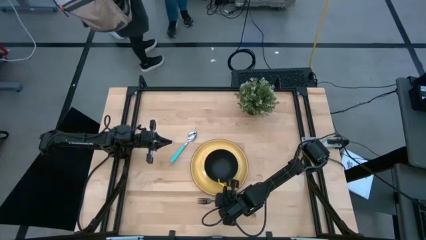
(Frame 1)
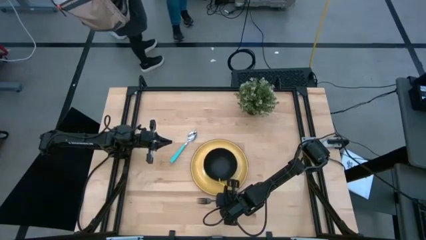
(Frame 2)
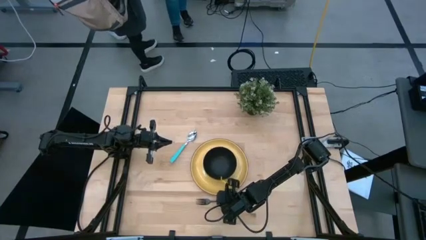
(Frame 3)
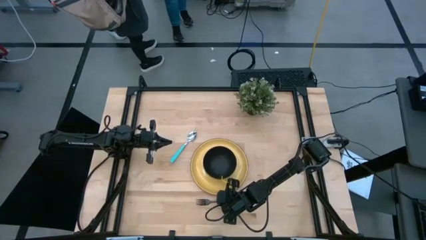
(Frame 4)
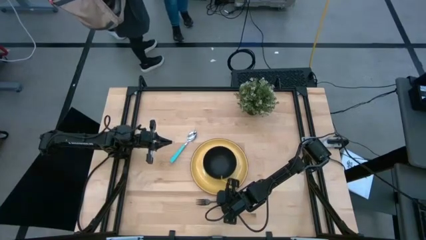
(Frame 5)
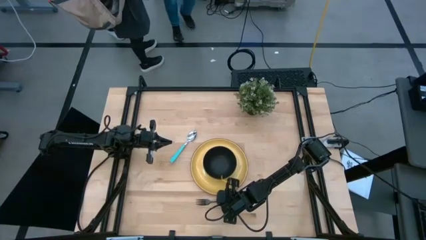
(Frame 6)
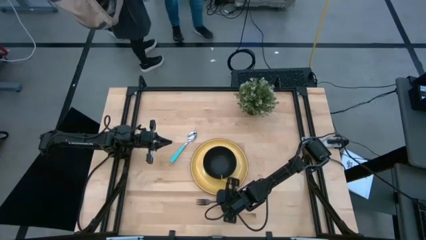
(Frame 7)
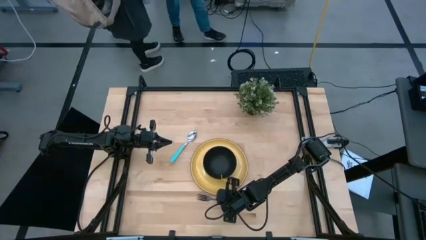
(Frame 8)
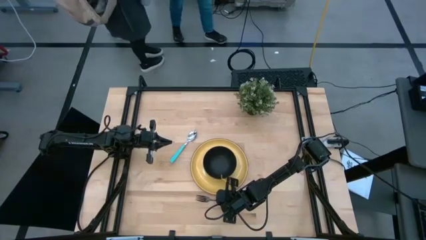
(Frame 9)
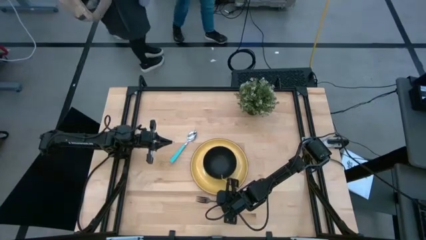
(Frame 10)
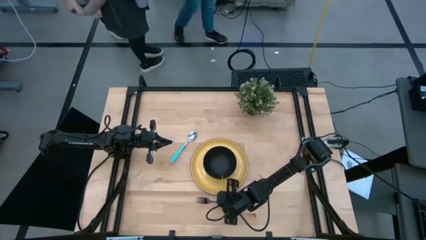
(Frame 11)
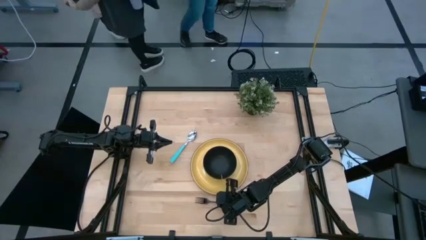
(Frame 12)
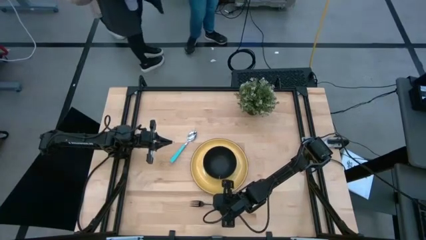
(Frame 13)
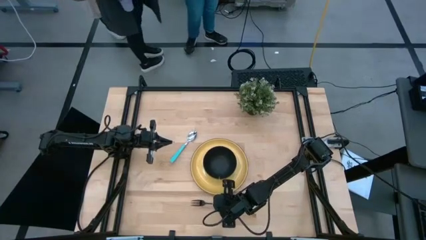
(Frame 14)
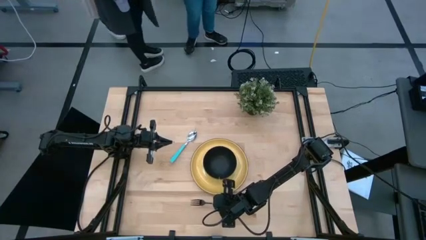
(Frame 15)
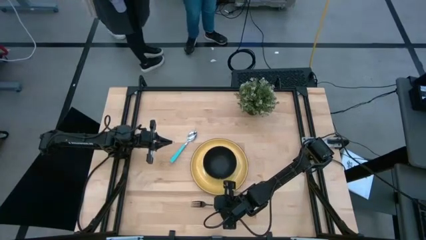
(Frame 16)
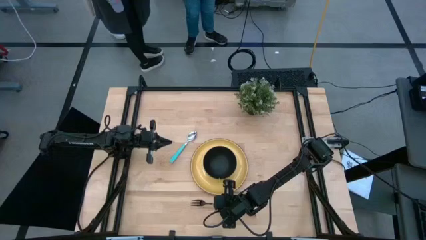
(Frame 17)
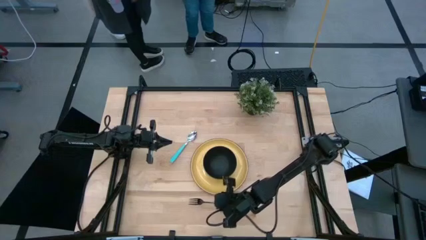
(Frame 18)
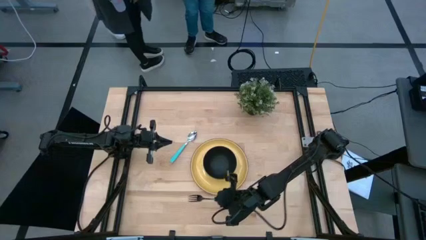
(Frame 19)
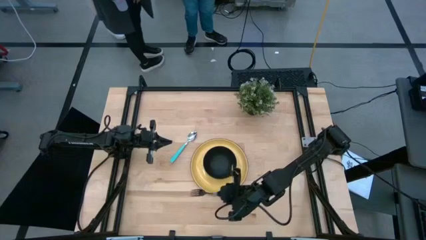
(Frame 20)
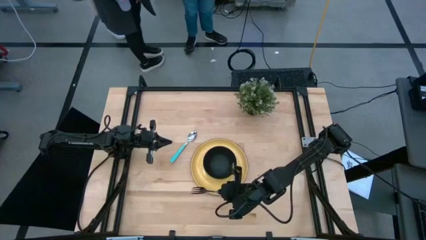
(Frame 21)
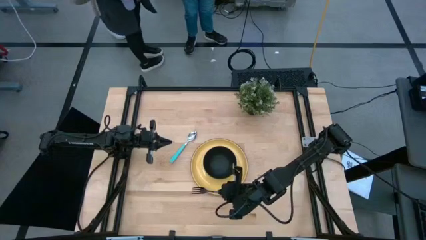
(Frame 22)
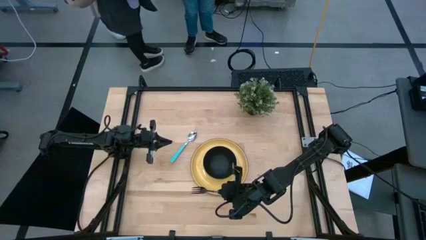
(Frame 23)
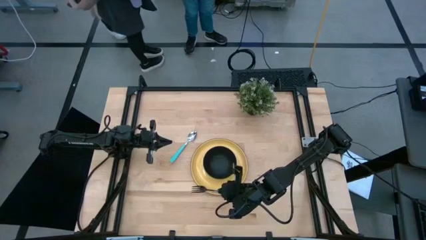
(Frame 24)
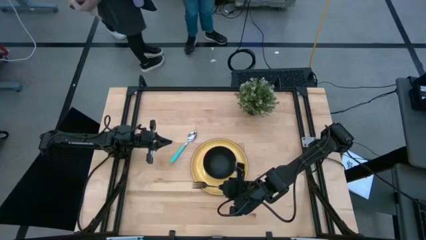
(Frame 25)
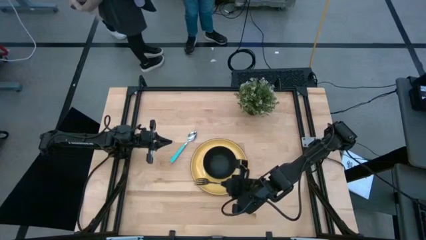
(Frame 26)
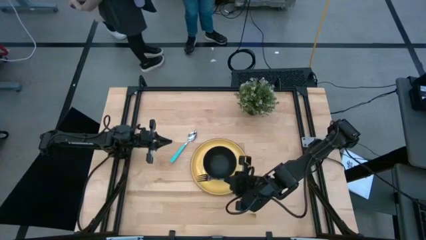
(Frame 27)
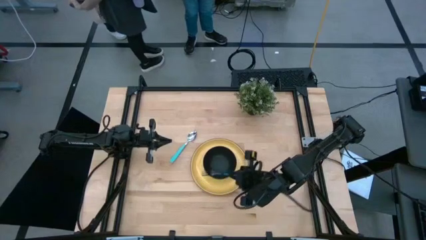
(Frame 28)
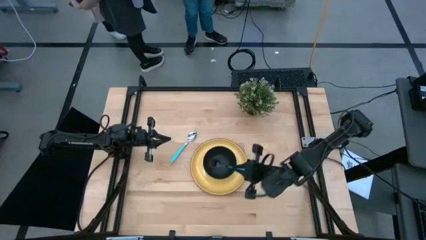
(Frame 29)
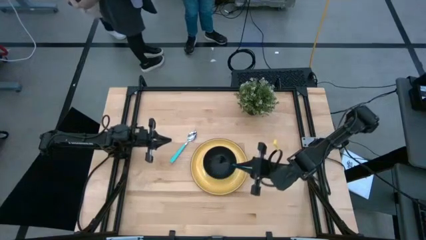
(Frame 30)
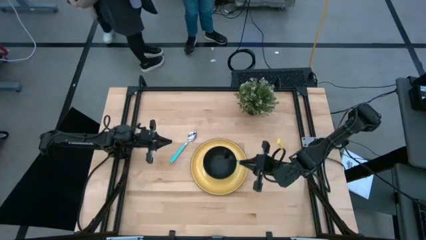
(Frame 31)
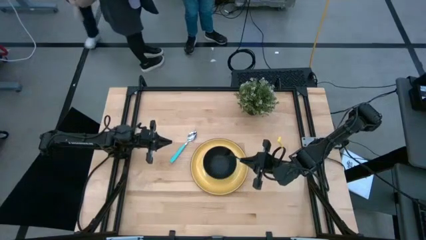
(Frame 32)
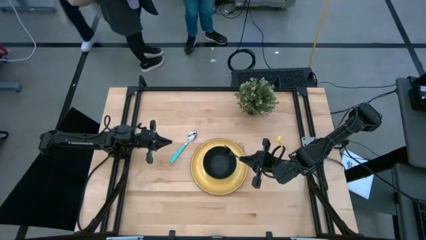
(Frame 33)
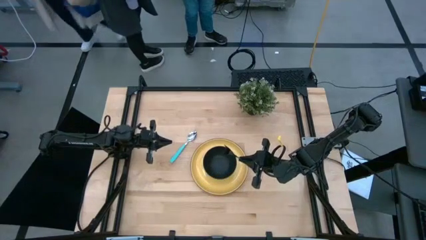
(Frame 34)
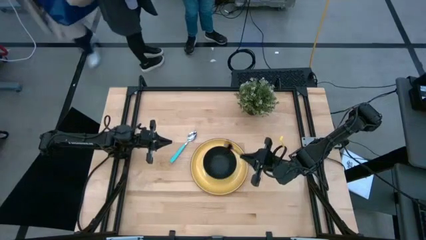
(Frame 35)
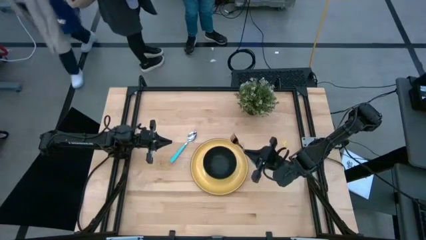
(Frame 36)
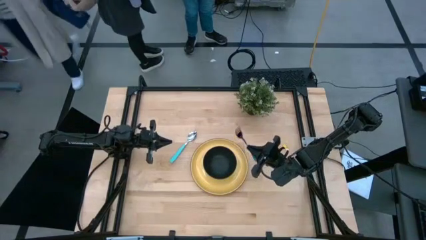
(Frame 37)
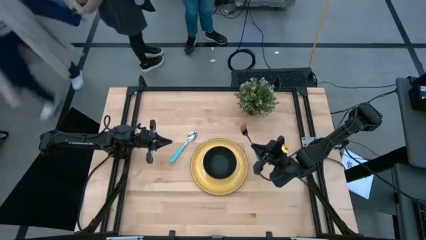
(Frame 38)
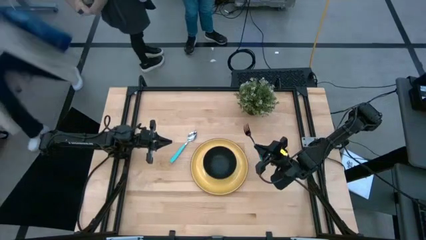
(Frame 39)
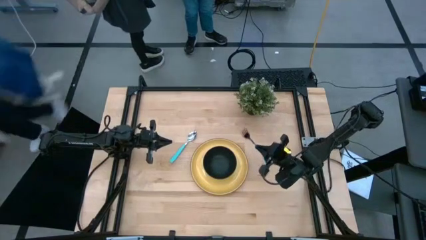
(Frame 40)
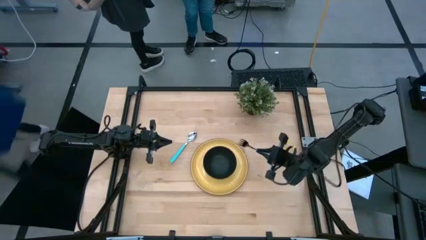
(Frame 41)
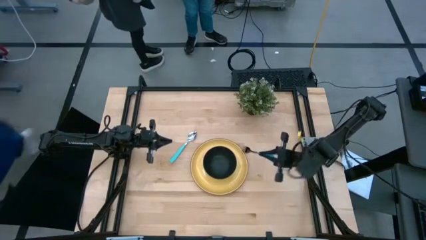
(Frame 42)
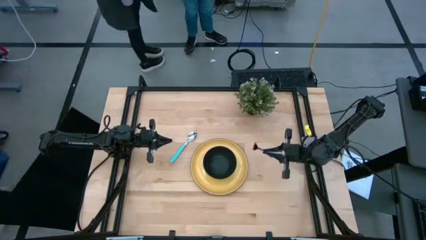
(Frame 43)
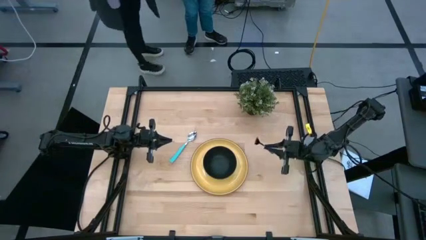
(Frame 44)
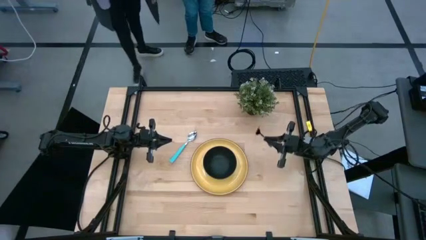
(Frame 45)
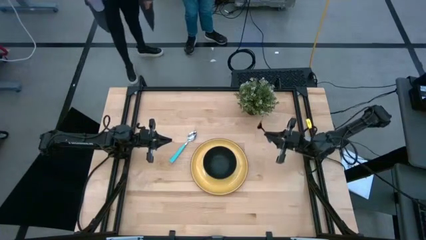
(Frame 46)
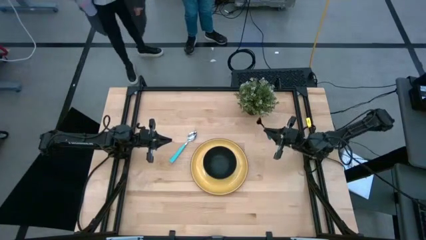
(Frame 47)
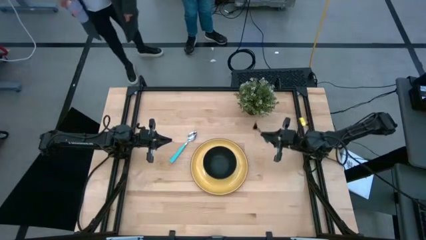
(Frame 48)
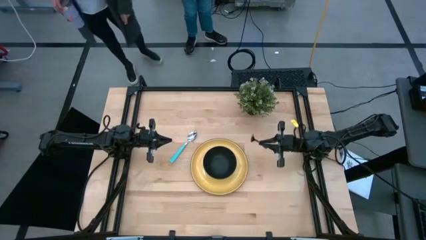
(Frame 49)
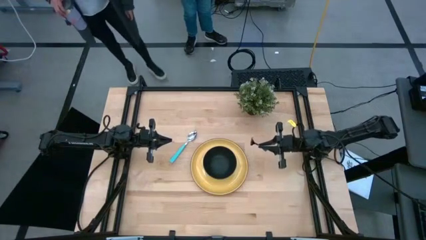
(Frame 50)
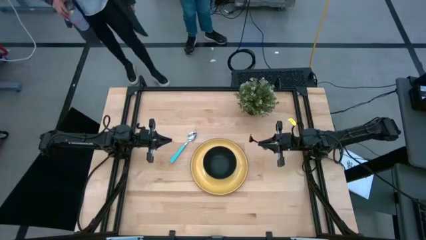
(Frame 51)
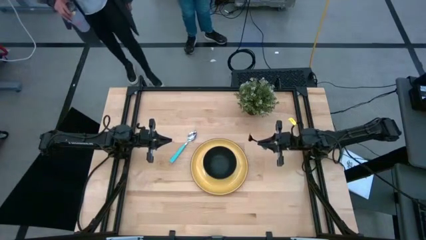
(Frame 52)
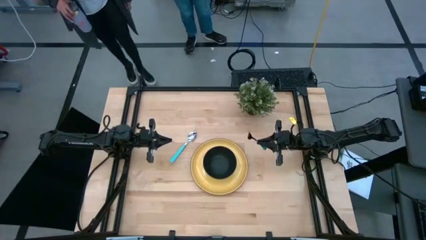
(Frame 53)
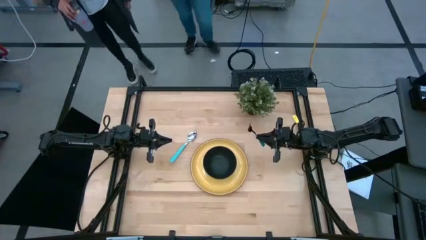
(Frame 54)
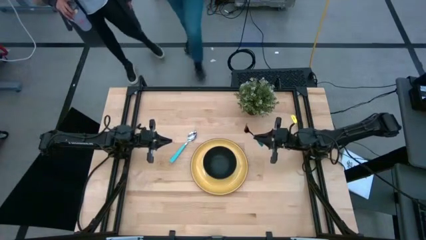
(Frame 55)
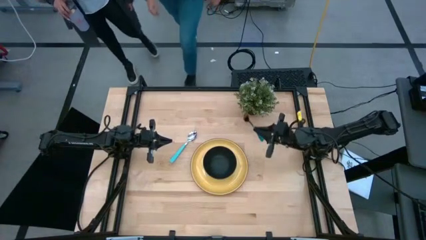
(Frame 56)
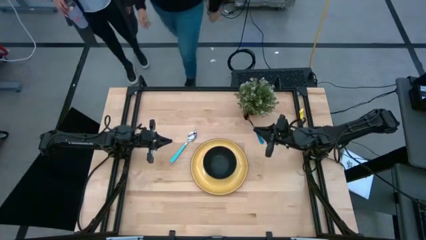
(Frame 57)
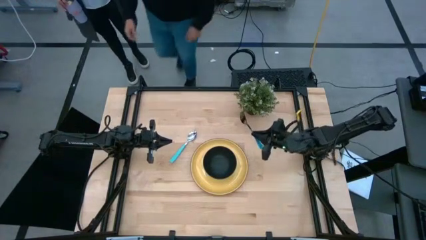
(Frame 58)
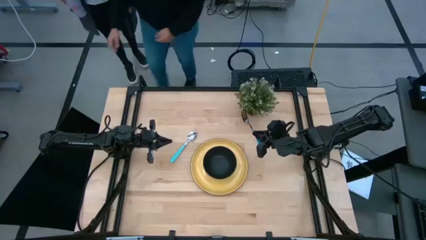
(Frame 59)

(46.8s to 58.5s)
Task: Set table place
Put the blue fork to the right of the black bowl on the yellow plate
